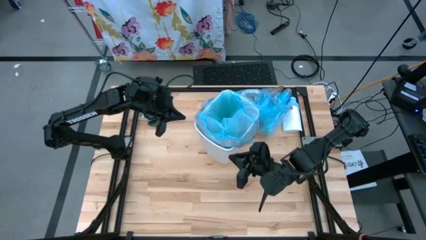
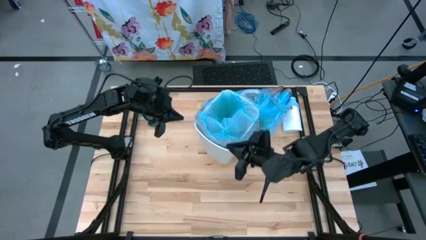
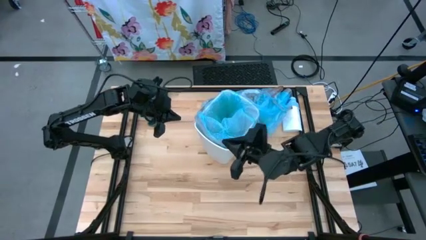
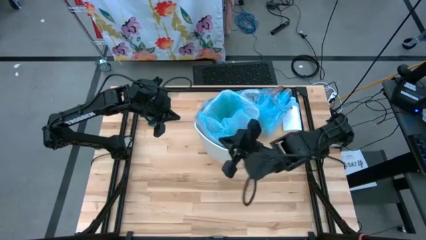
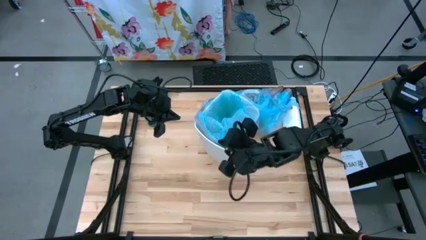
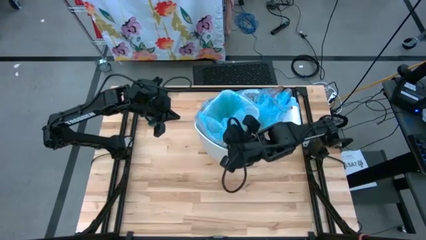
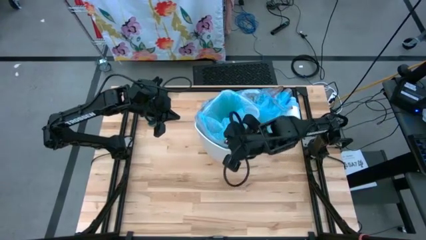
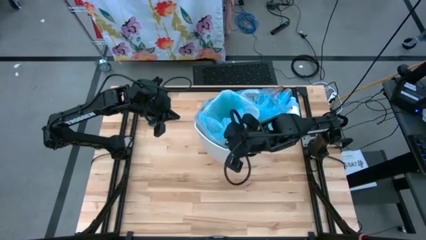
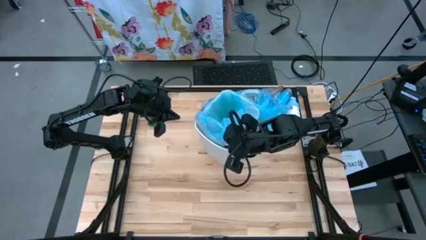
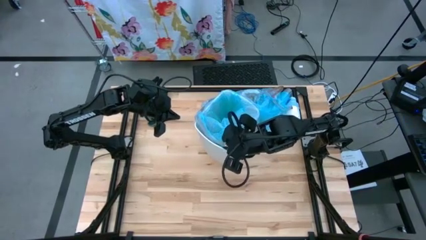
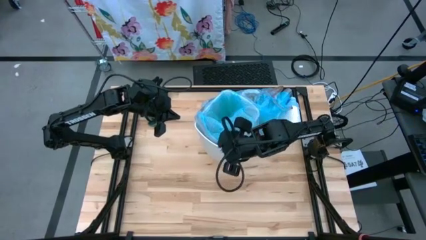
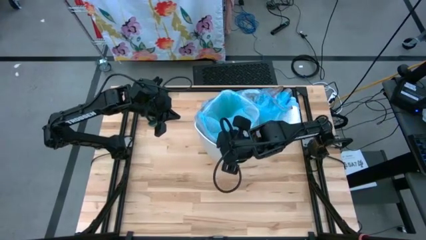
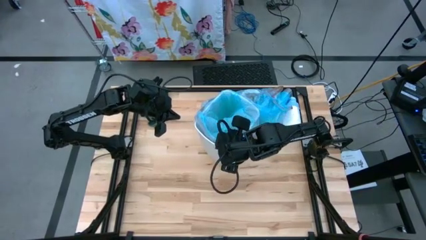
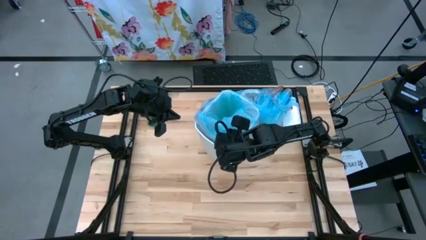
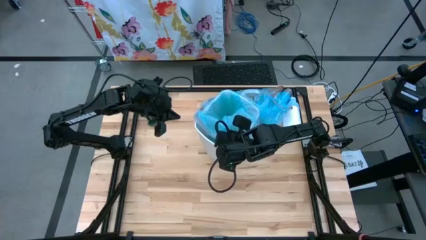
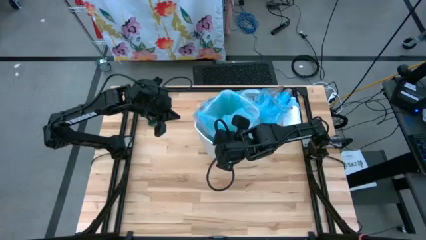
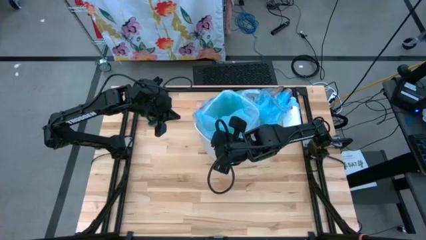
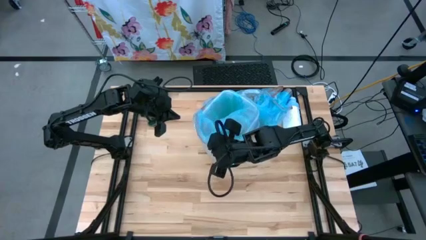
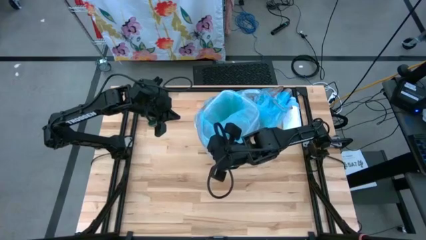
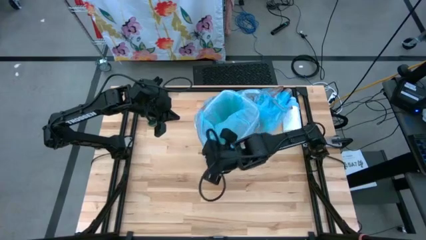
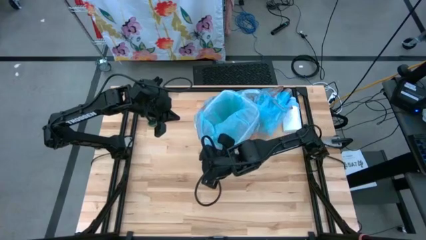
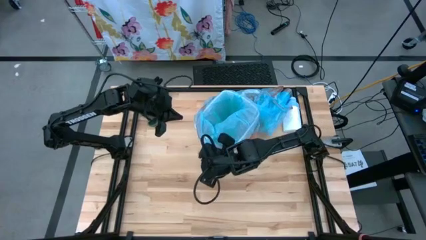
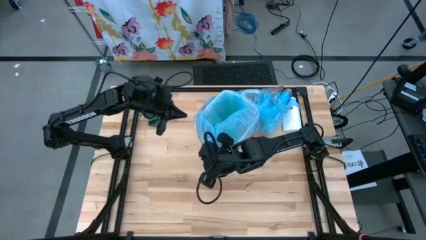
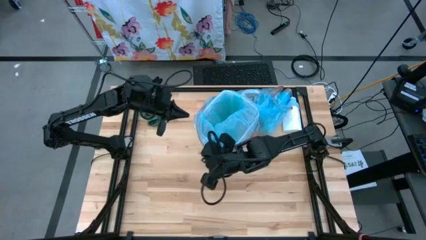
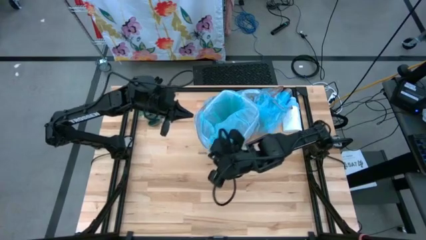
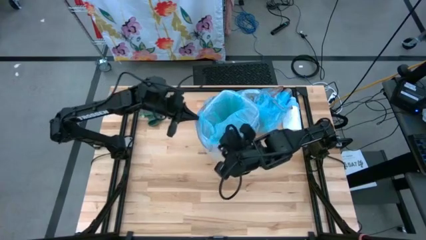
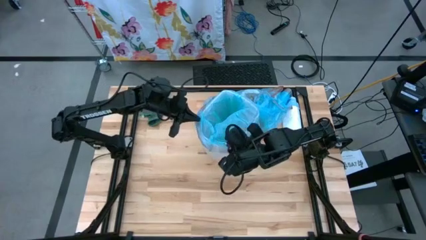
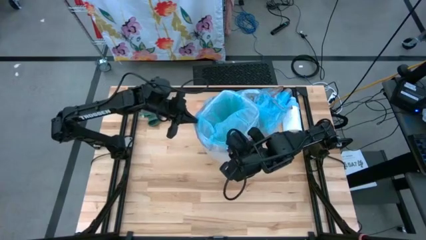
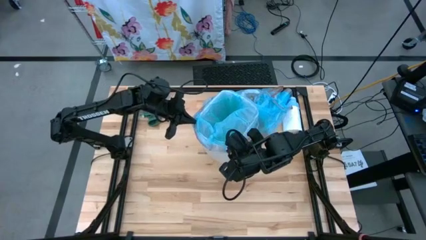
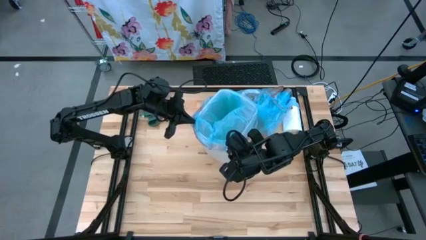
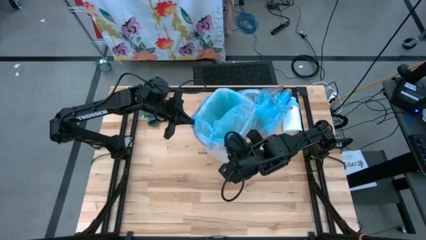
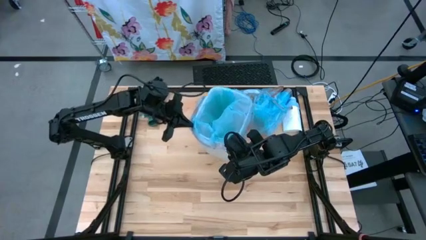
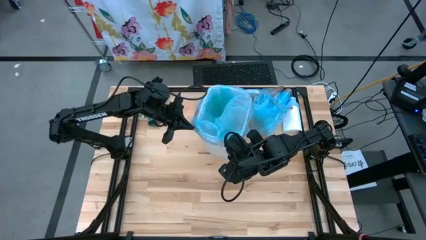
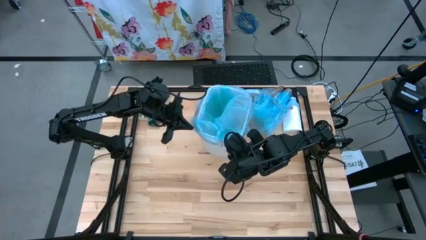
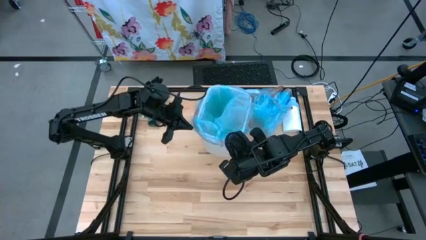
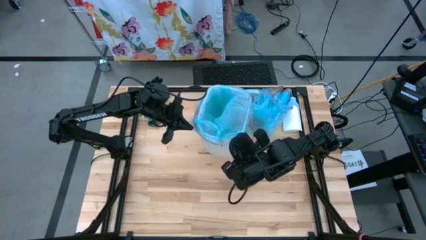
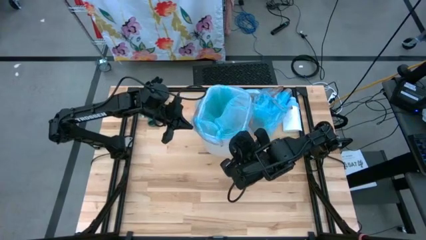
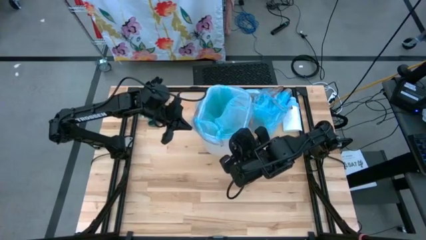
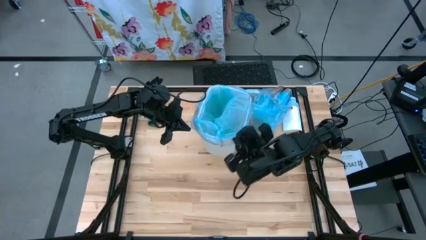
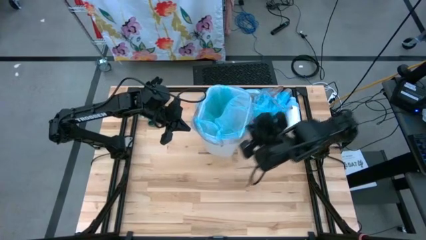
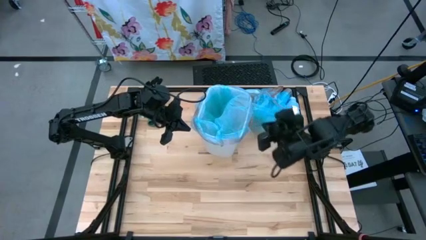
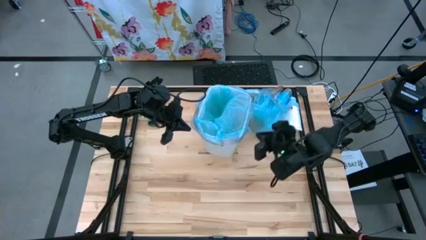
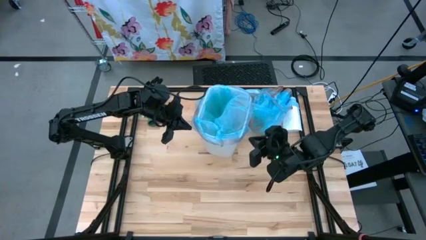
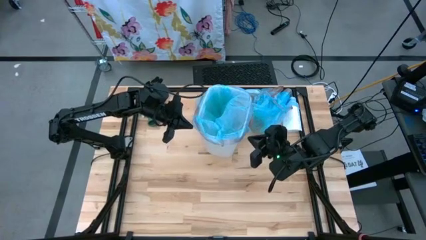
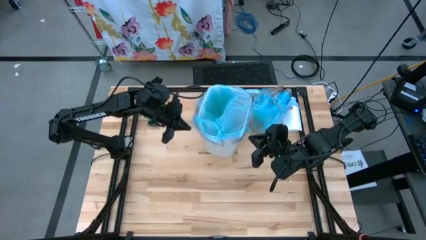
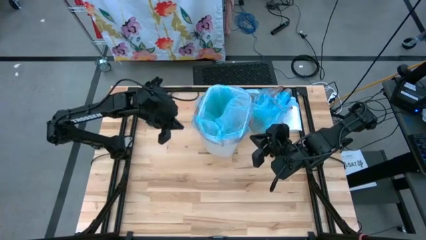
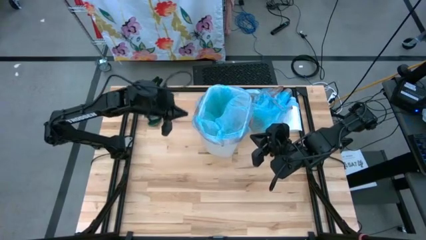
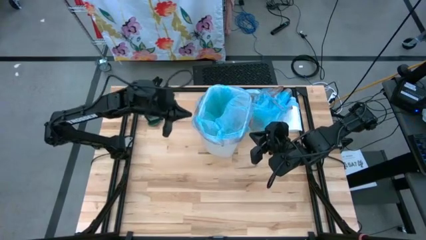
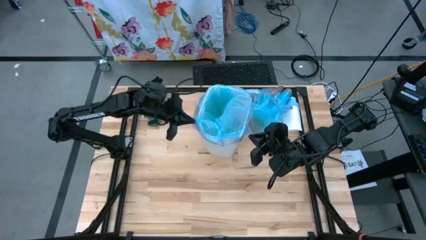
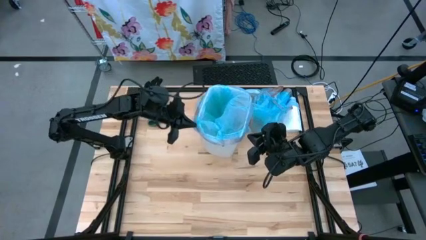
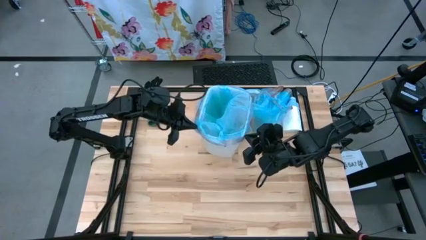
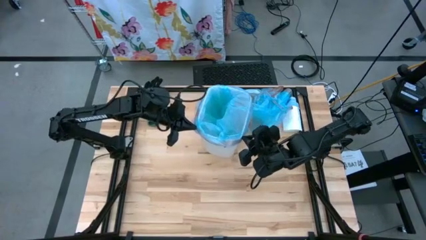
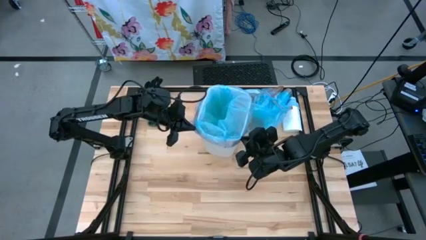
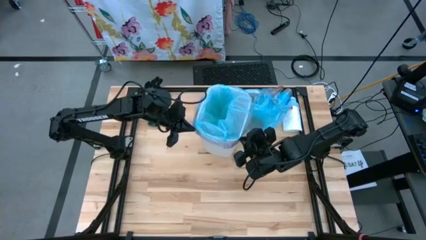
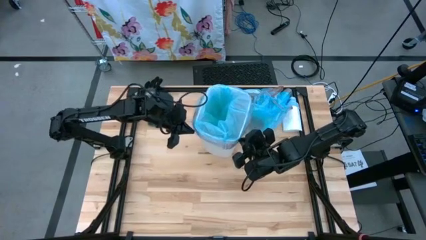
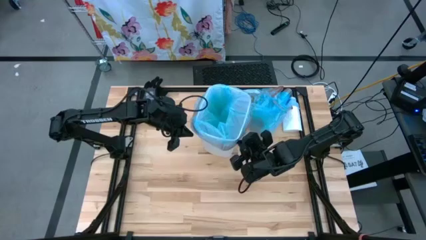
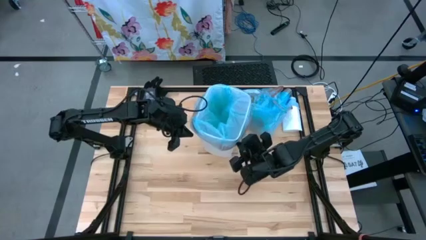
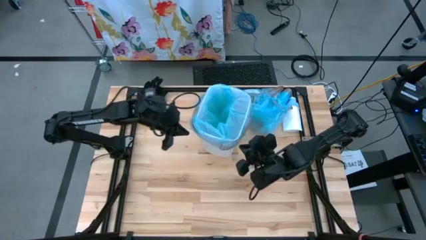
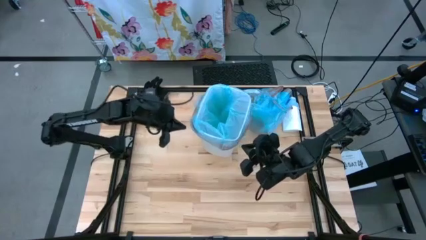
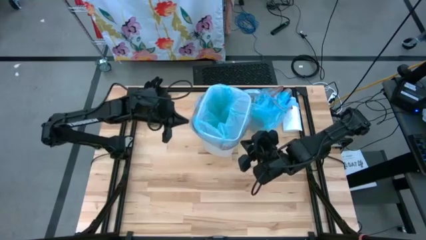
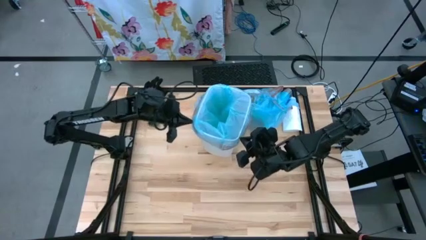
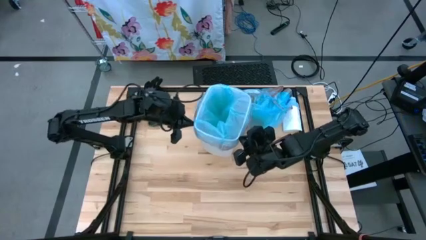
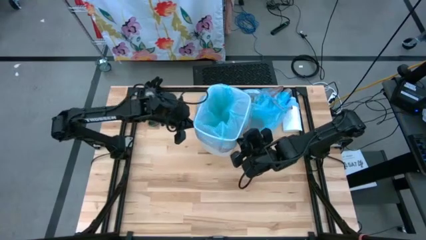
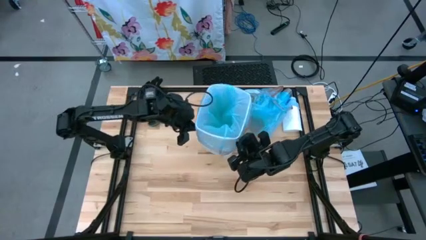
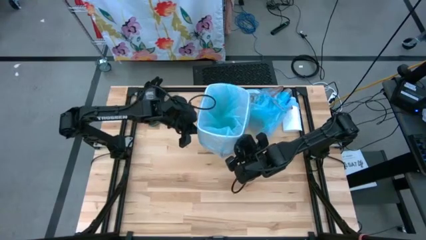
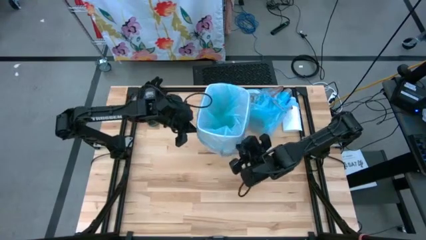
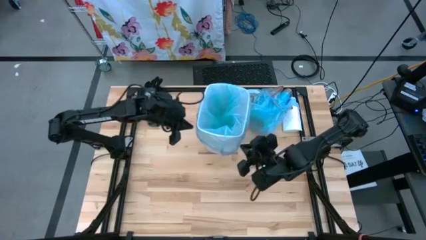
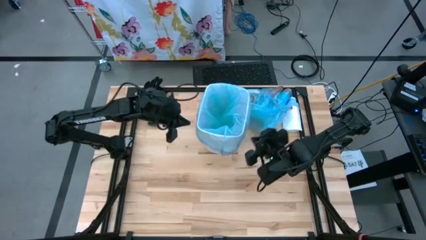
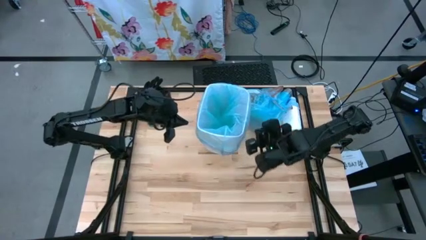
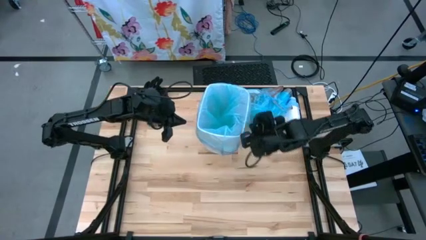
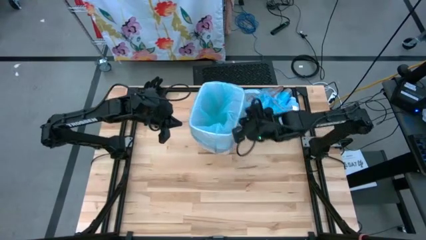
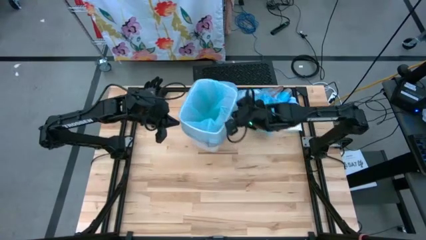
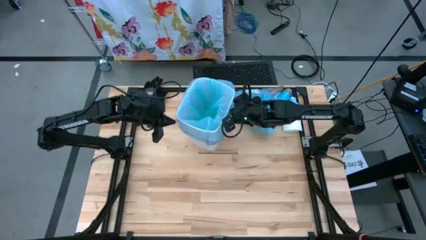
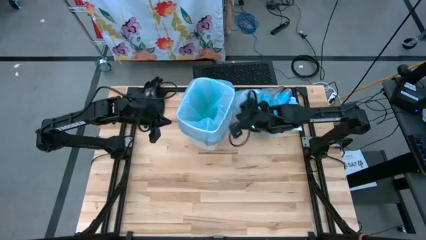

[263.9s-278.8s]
Task: place trash/remove bag and relplace
Insert the new blue trash bag into the trash bin
